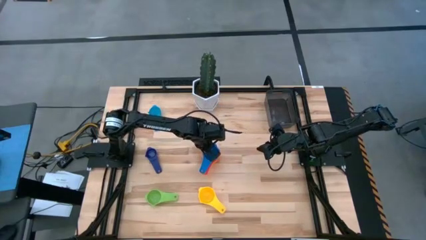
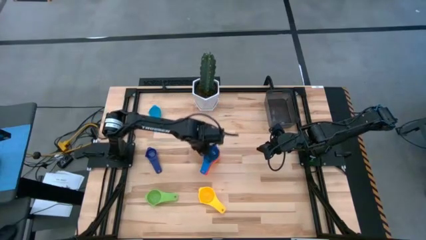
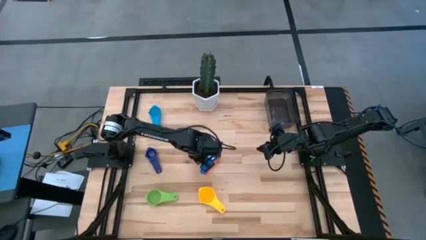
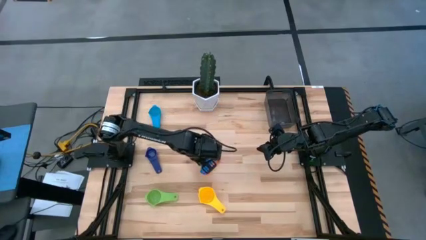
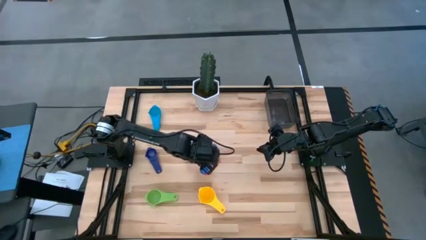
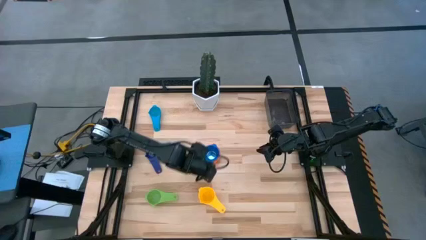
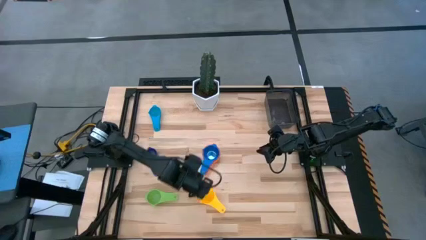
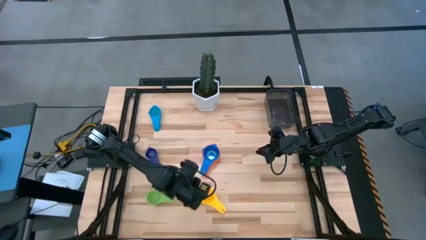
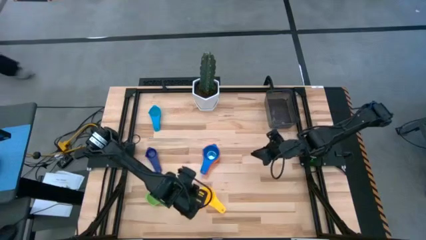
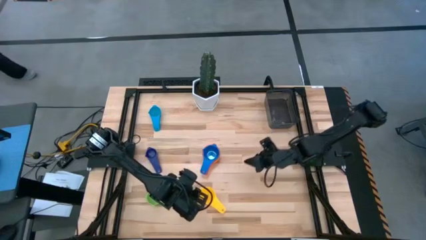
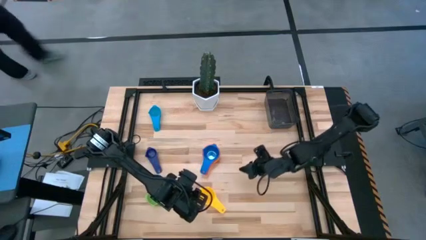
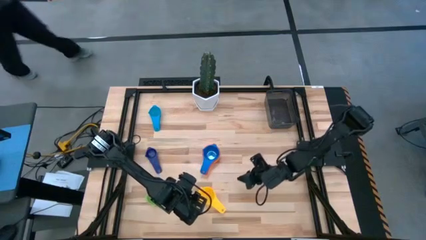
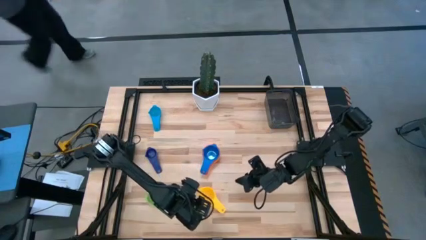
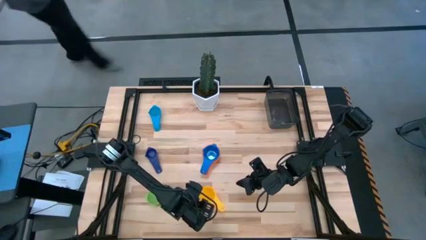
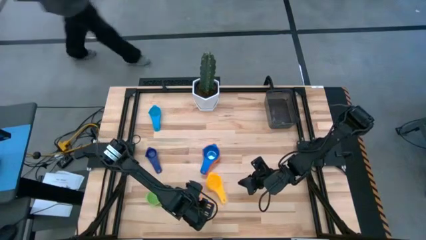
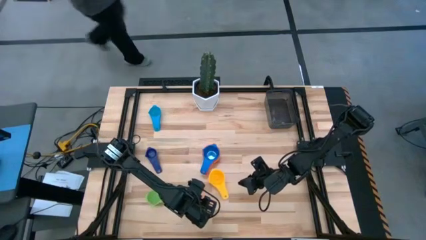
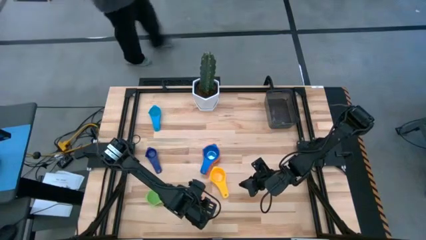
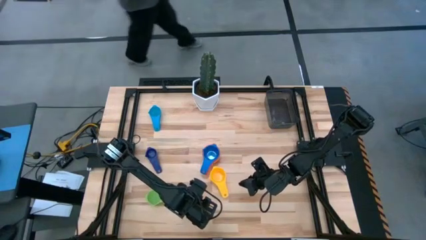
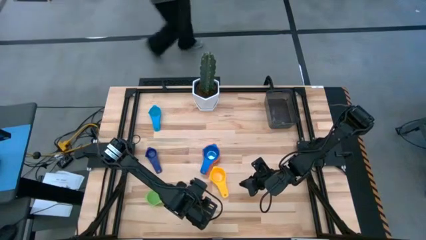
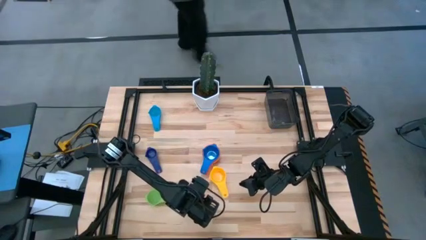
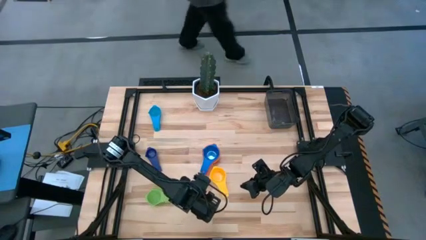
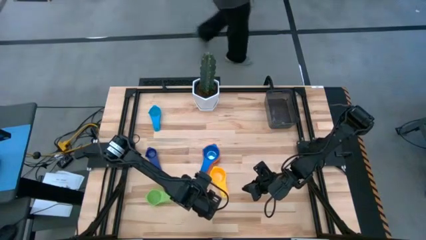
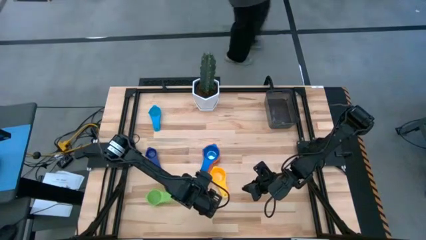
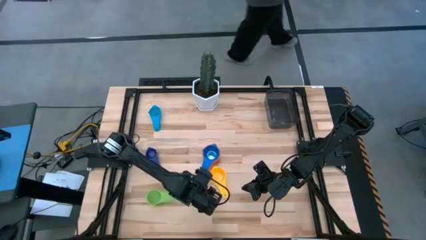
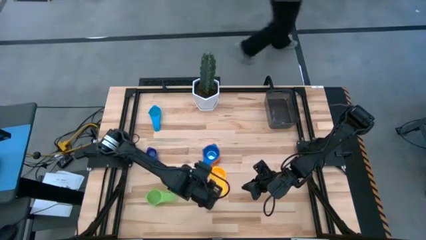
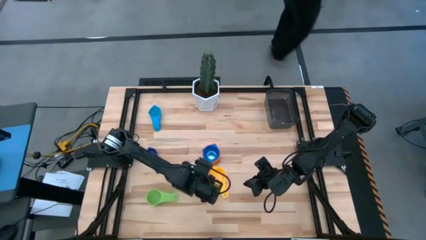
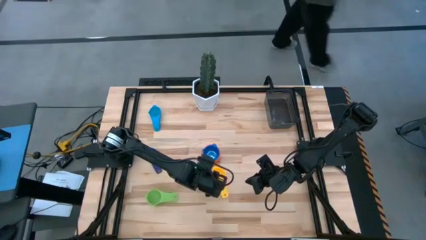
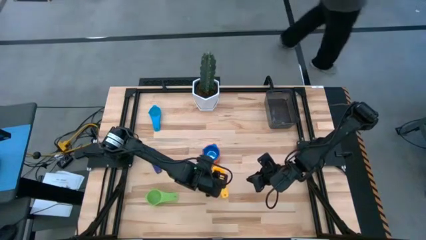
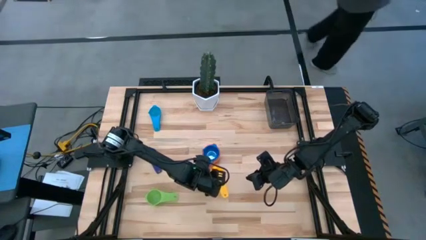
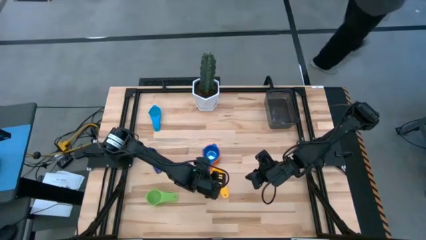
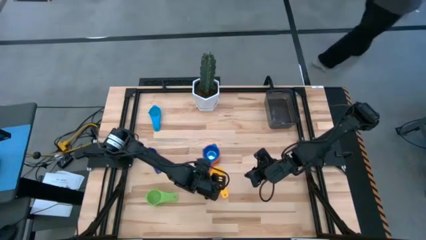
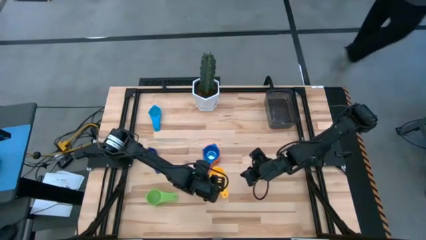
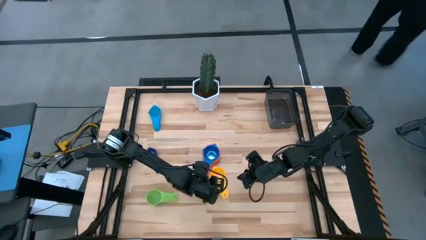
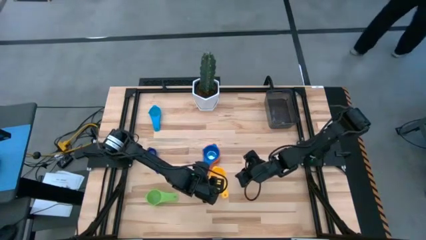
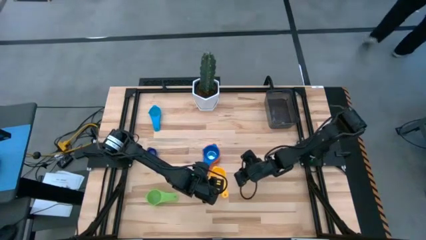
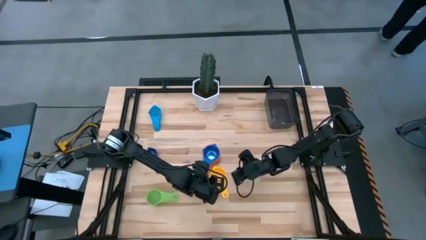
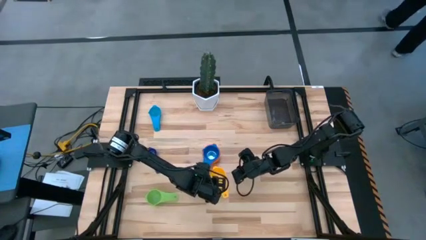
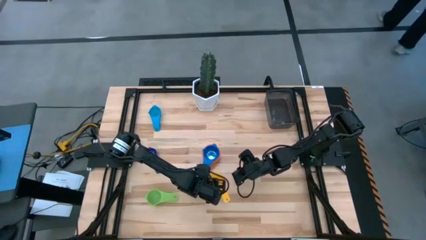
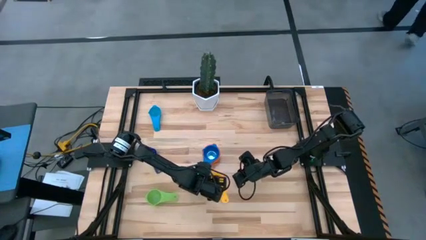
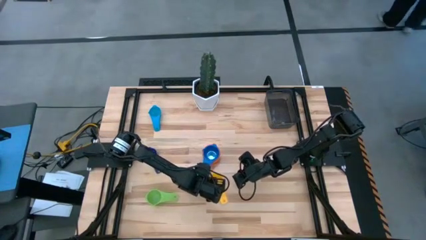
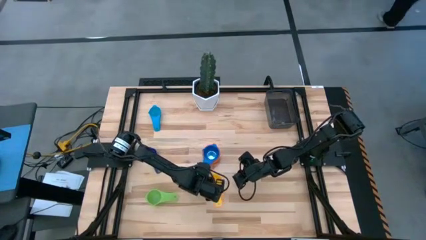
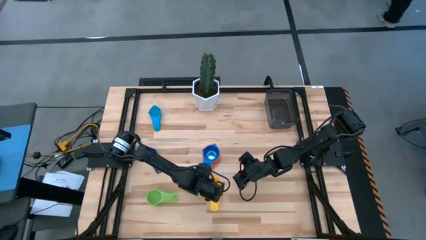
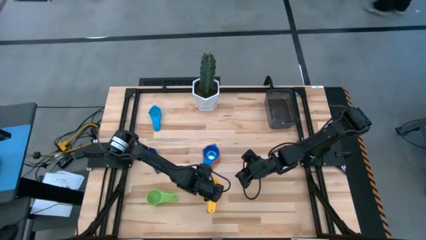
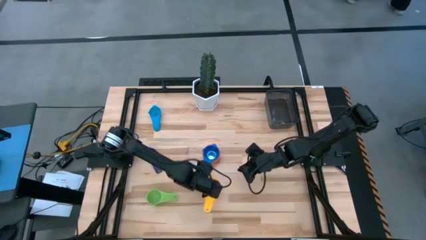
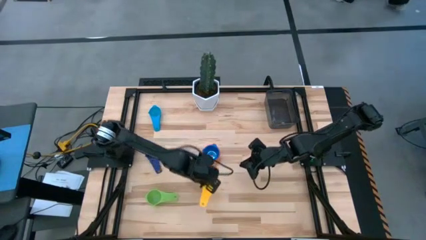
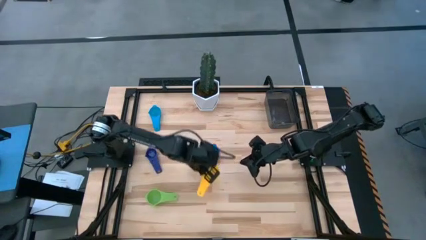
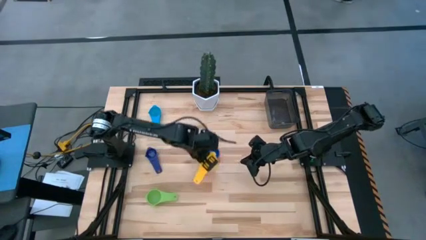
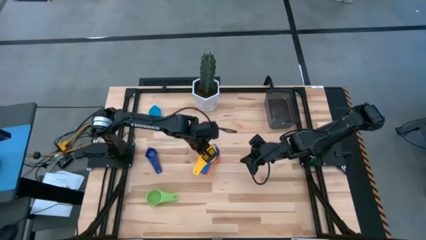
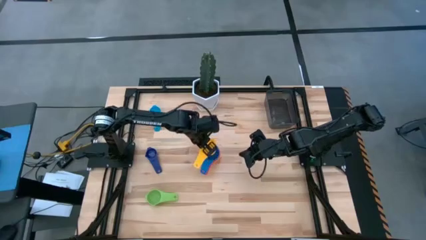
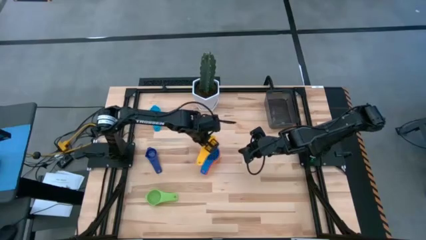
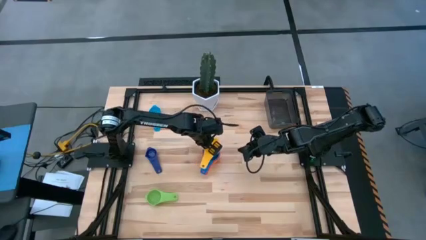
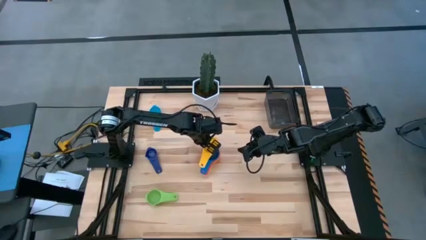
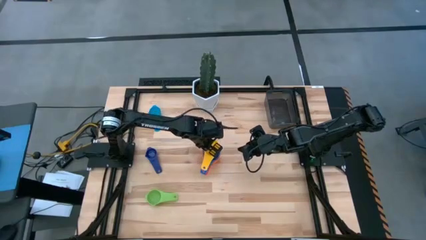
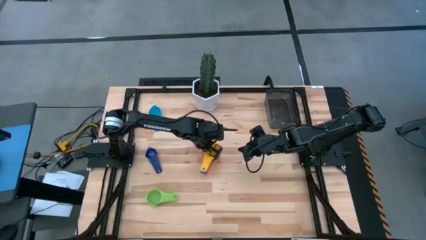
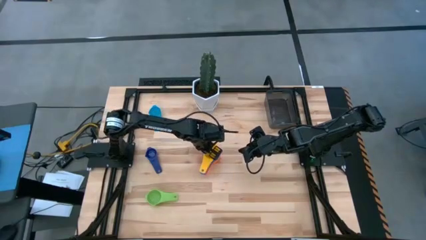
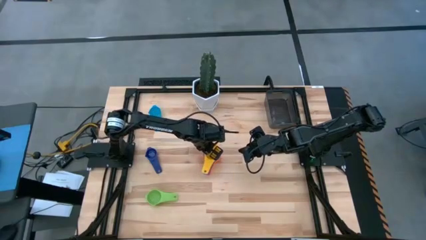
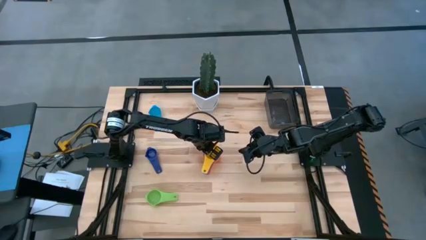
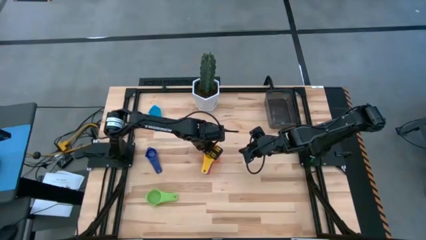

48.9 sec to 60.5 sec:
Task: Nest measuring cups in basket
Stack the yellow measuring cup on top of the blue measuring cup

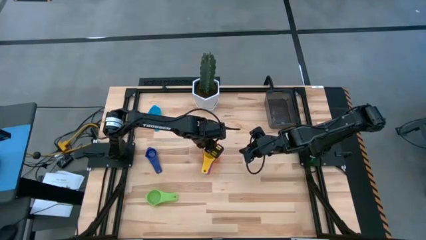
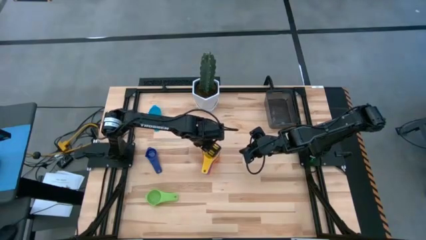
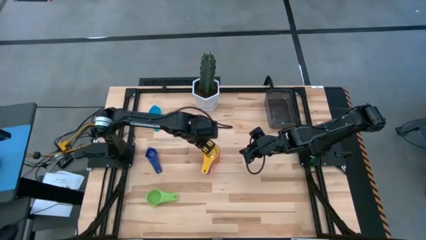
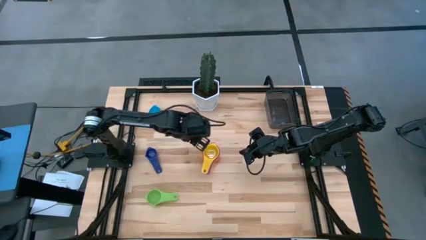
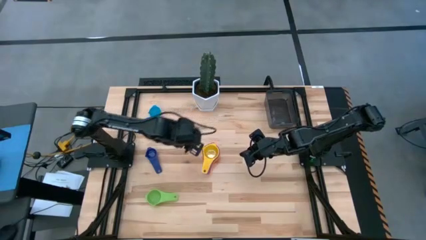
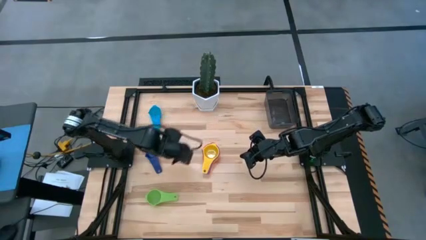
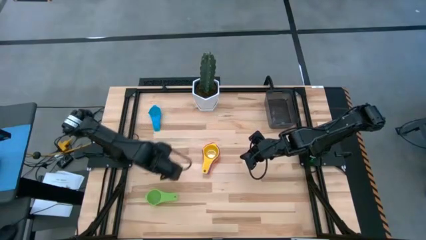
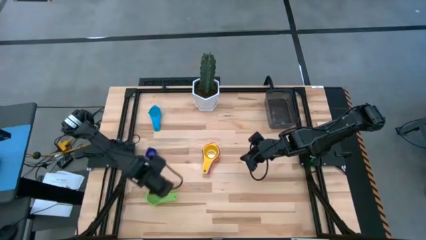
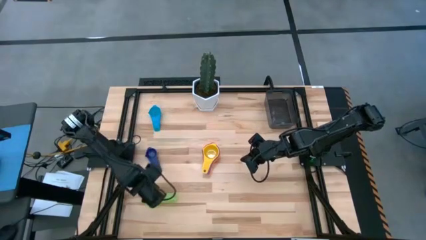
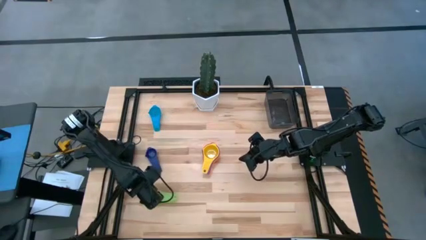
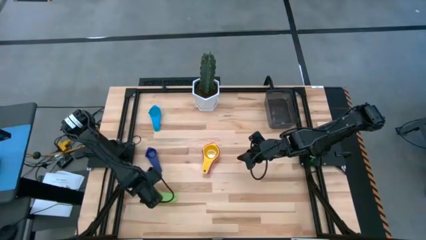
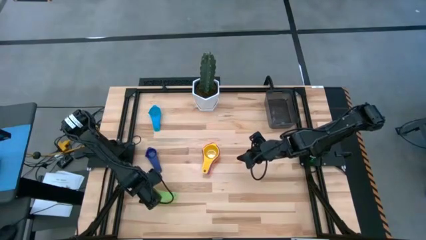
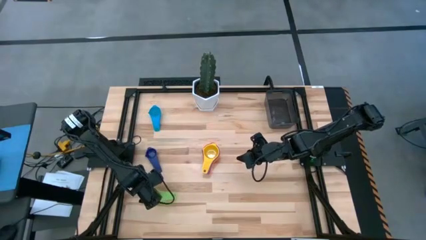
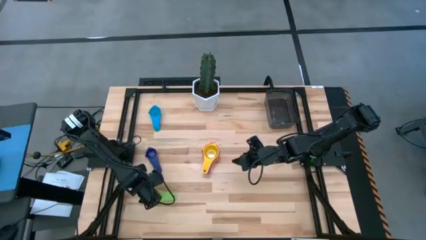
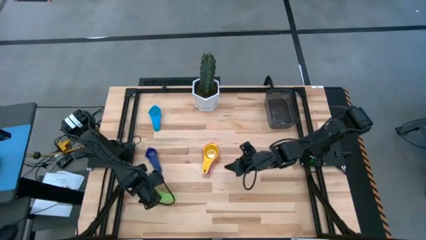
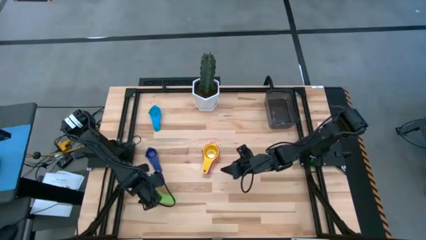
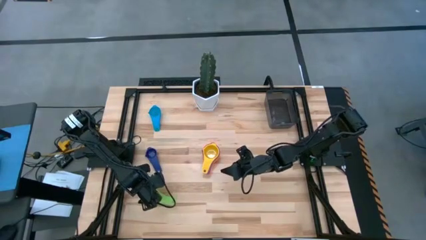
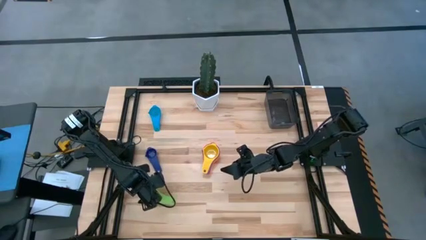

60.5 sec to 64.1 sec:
Stack the green measuring cup on top of the yellow measuring cup
